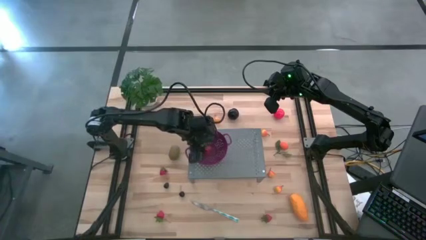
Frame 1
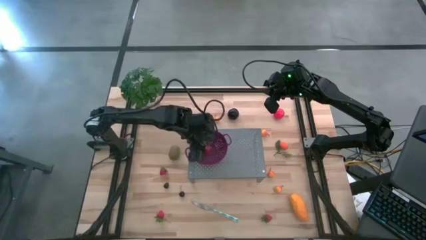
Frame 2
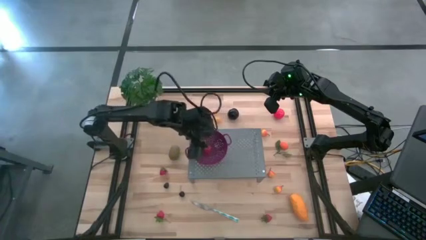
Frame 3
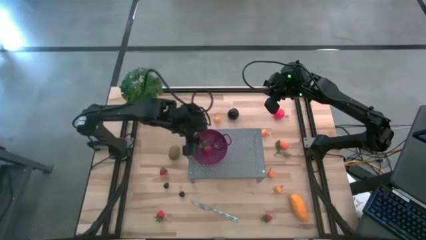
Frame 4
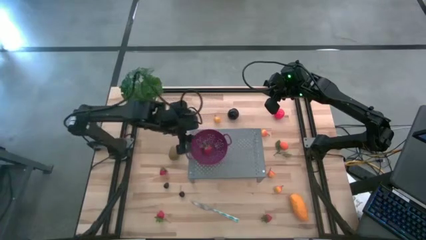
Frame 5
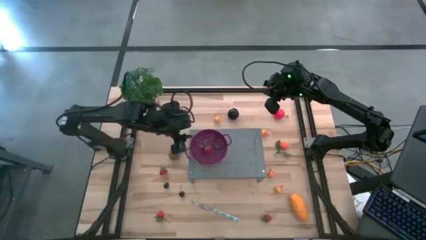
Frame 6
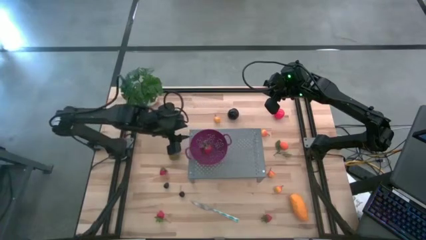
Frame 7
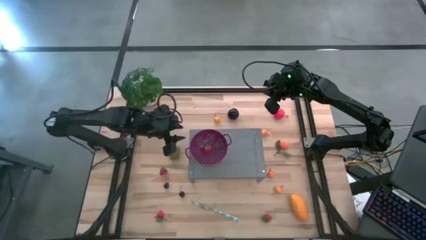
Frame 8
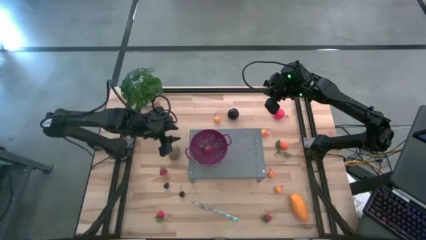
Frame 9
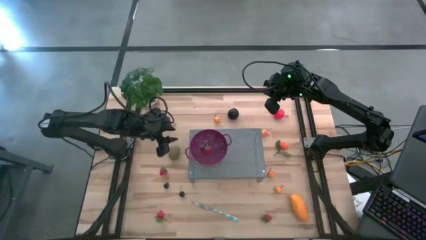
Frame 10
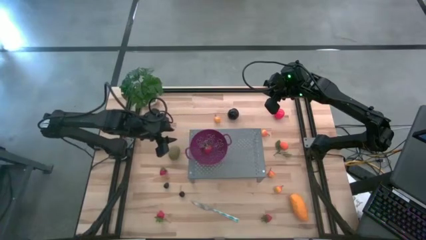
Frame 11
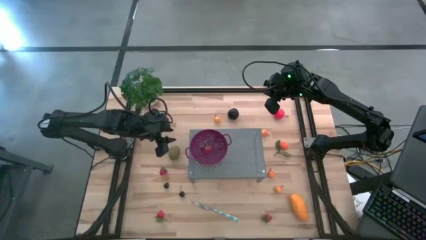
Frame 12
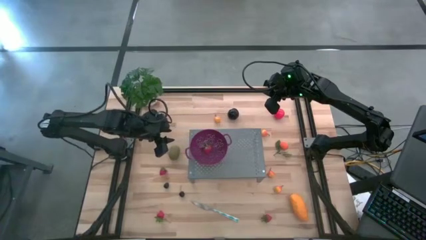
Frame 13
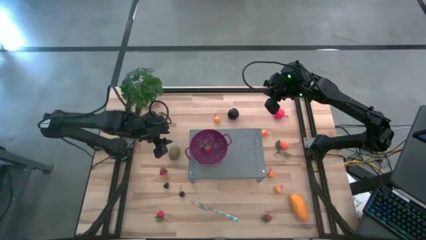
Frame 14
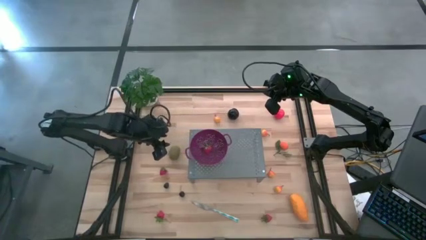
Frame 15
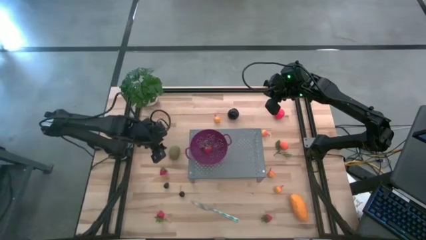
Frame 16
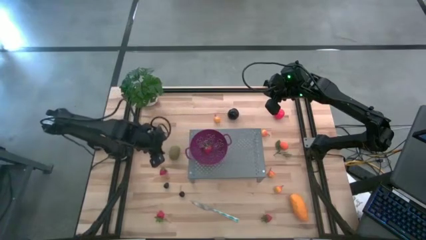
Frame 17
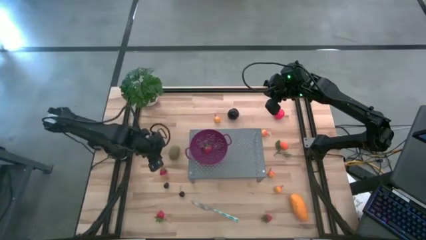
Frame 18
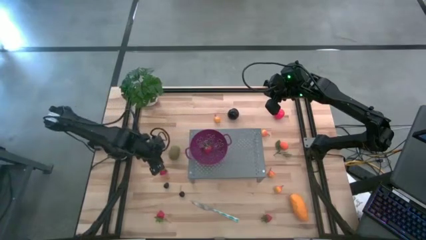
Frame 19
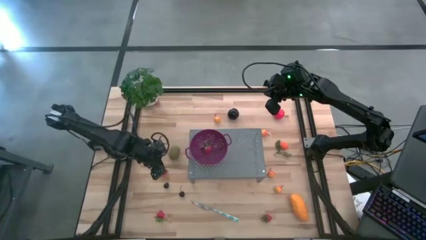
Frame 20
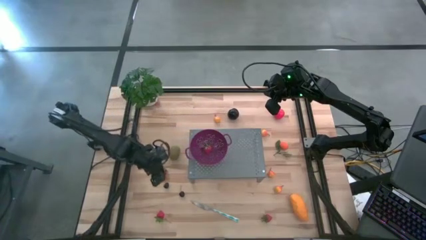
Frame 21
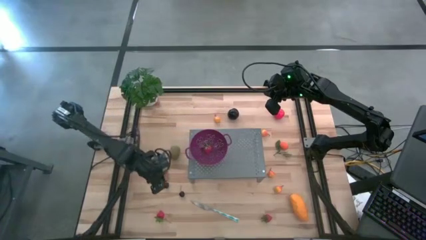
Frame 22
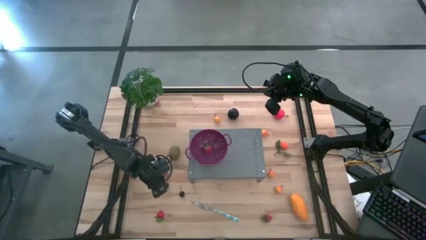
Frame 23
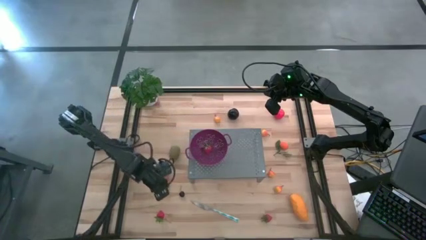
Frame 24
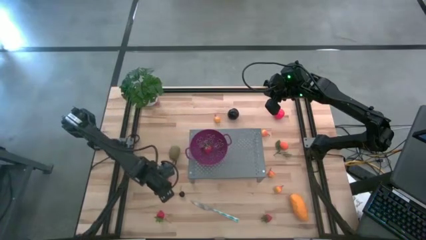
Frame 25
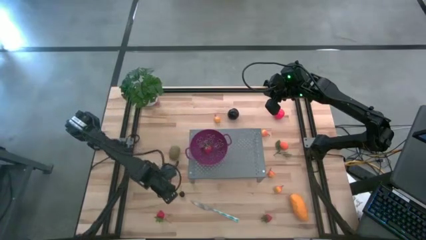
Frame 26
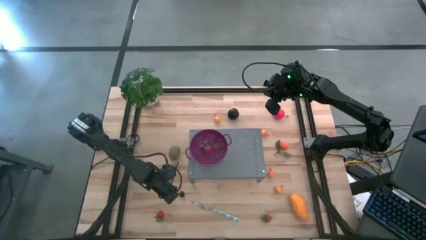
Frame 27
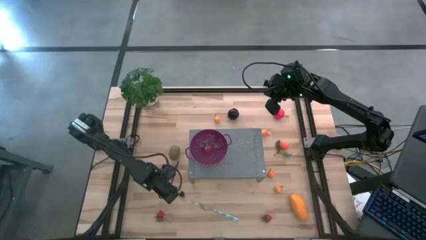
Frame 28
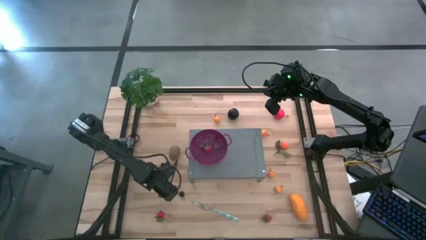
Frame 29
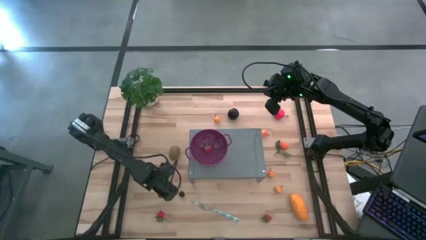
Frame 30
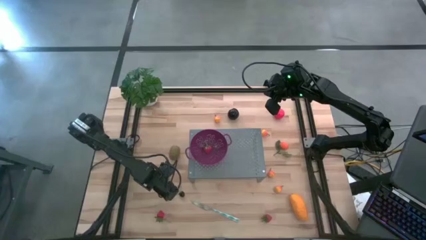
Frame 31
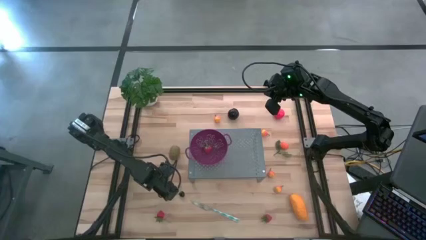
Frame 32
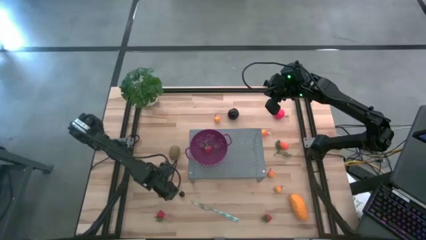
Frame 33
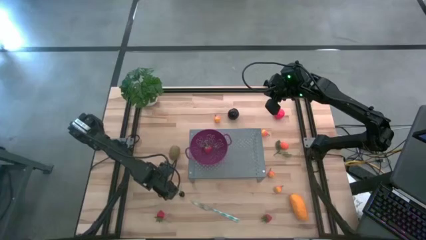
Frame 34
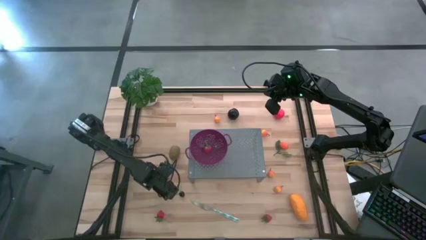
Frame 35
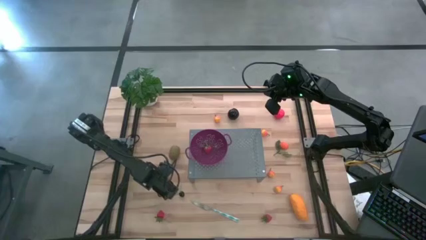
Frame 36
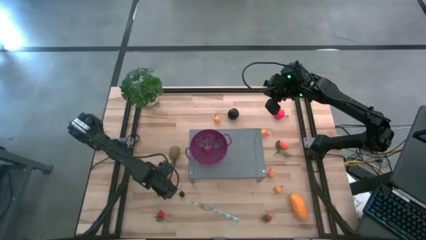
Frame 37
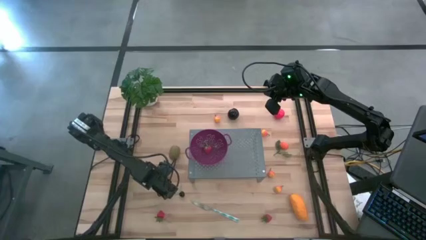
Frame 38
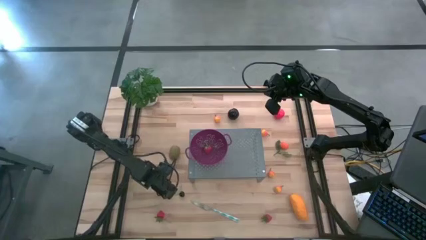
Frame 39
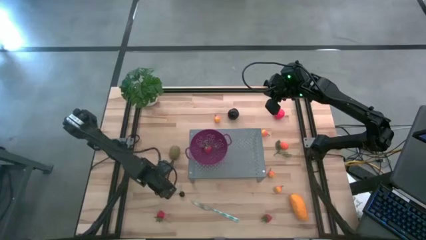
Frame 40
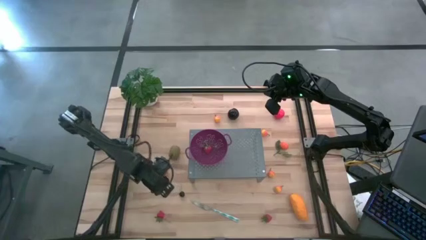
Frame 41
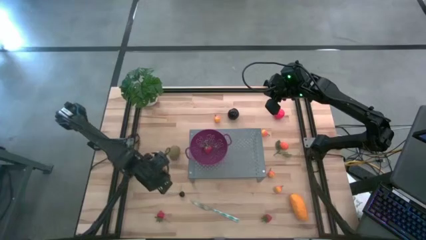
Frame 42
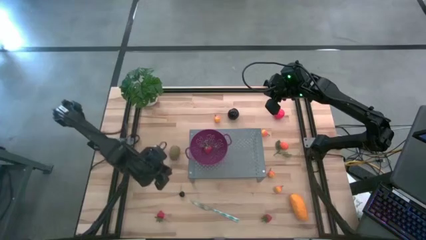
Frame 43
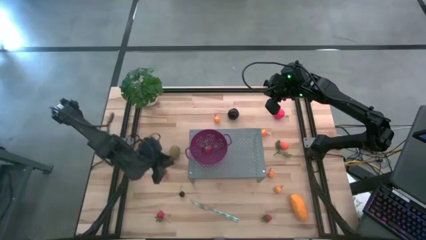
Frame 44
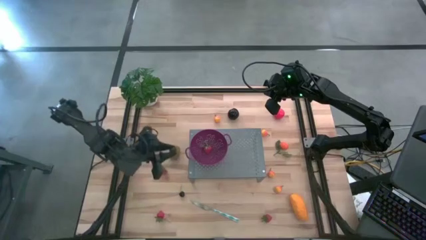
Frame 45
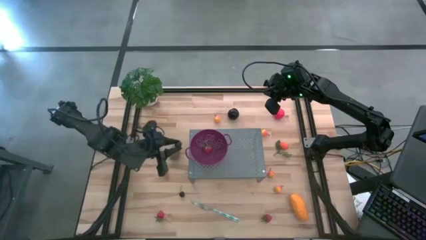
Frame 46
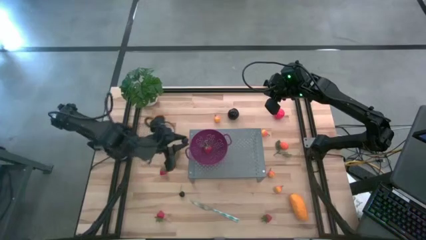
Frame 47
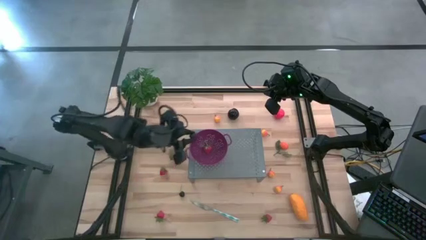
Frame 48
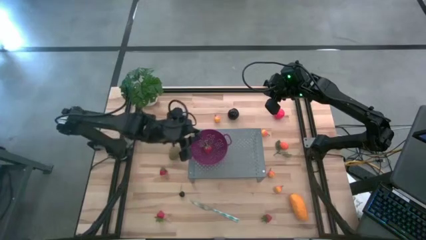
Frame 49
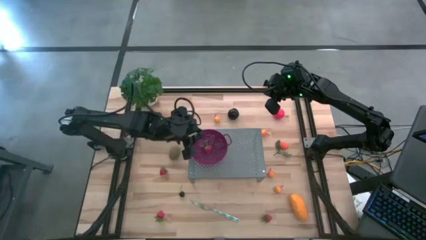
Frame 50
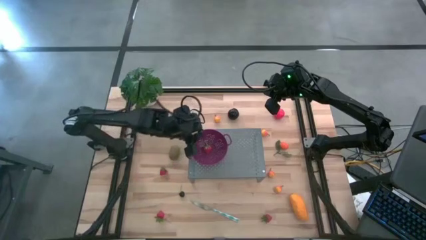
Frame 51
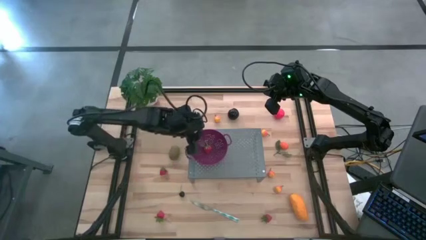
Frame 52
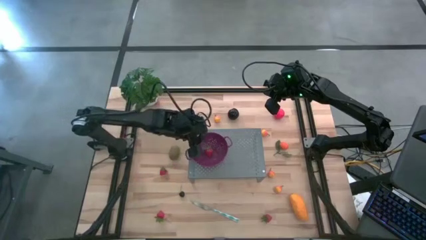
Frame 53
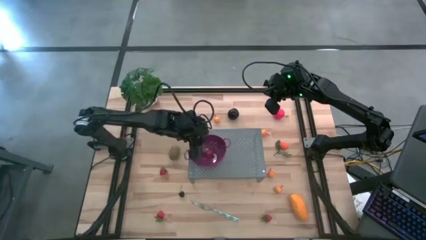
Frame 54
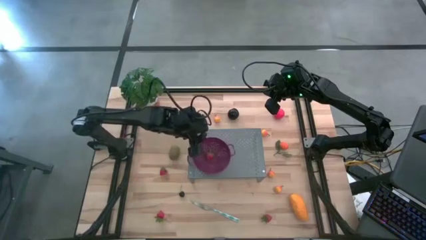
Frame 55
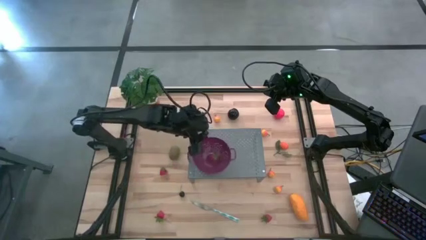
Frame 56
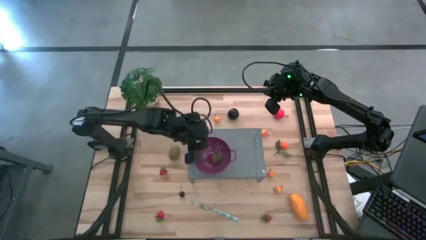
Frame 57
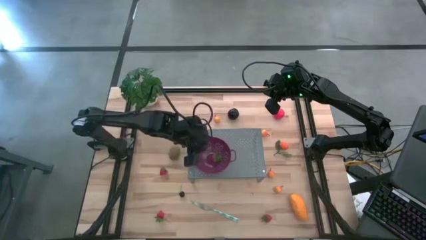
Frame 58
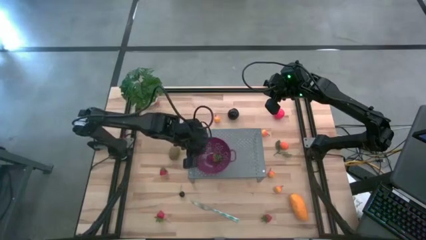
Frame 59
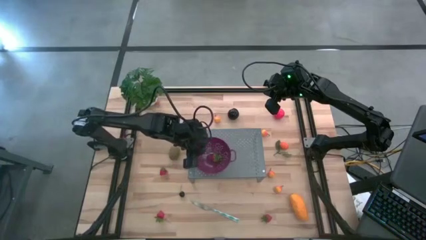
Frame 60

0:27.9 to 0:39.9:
Task: Pick & Place Fruit
Put the blackberry into the purple strainer bowl
